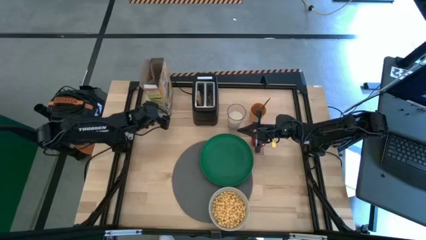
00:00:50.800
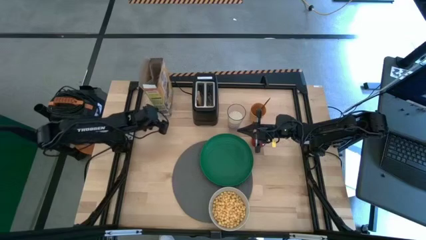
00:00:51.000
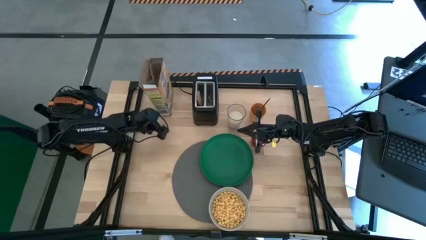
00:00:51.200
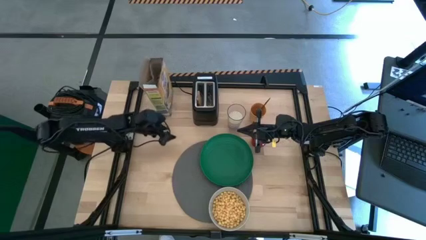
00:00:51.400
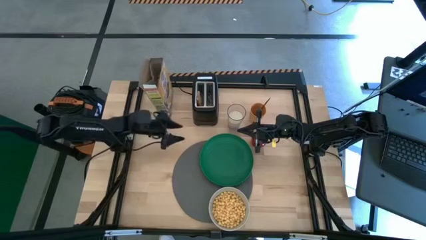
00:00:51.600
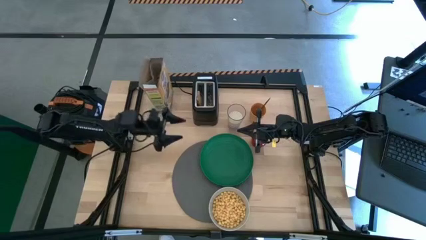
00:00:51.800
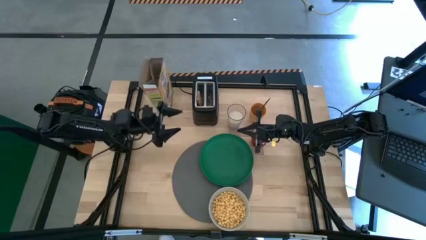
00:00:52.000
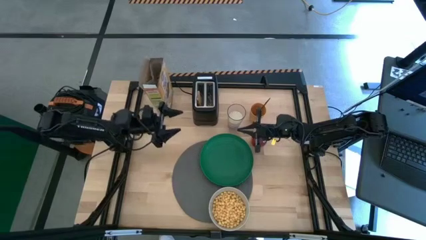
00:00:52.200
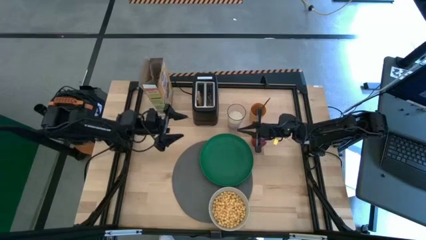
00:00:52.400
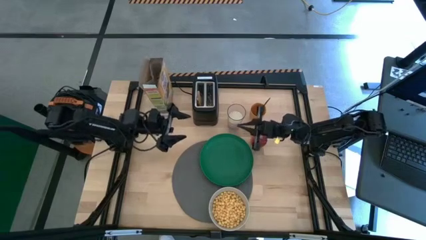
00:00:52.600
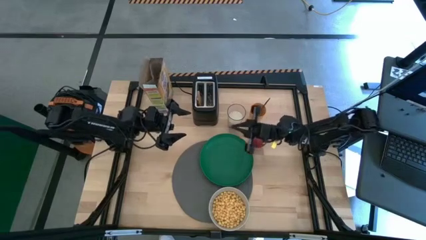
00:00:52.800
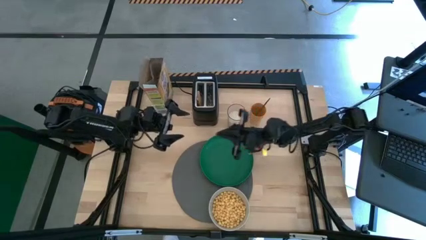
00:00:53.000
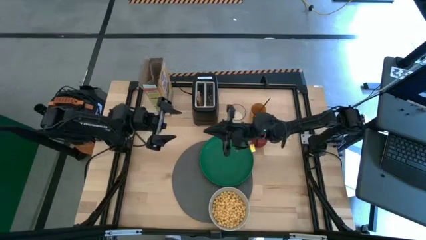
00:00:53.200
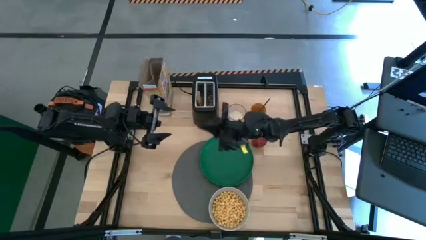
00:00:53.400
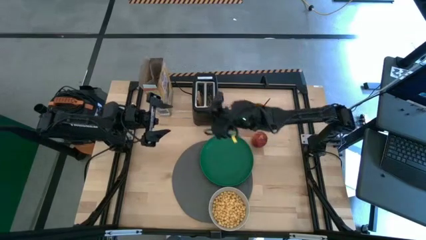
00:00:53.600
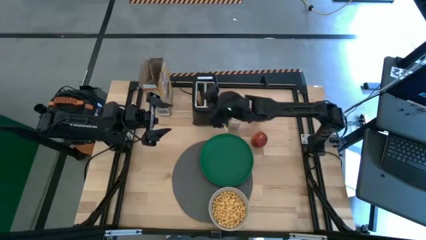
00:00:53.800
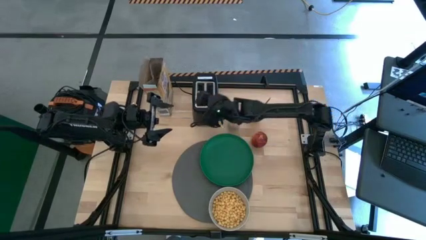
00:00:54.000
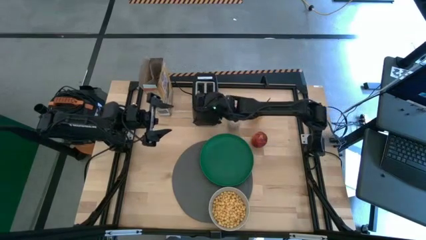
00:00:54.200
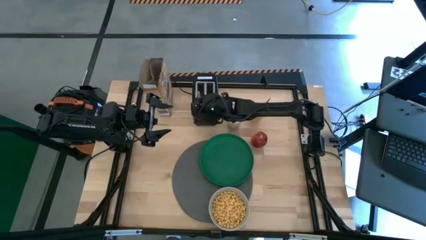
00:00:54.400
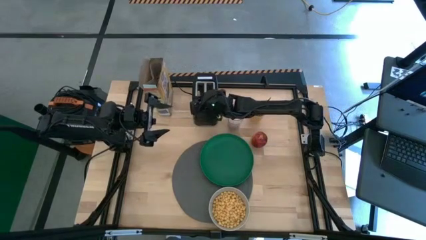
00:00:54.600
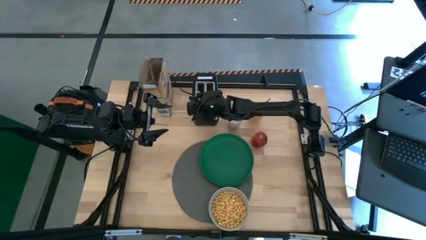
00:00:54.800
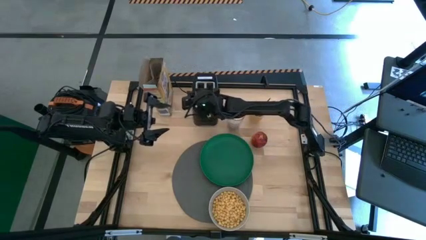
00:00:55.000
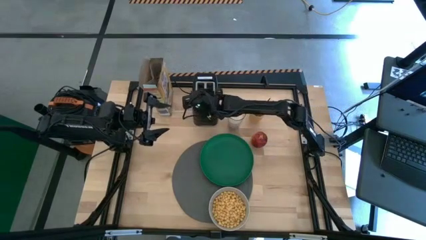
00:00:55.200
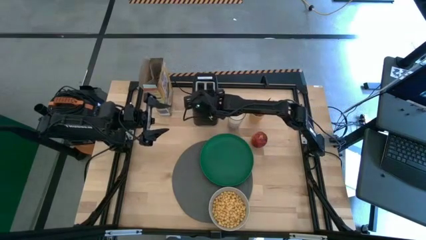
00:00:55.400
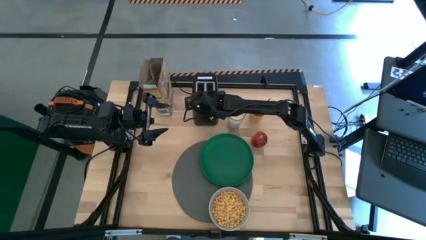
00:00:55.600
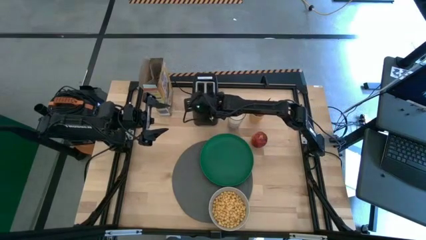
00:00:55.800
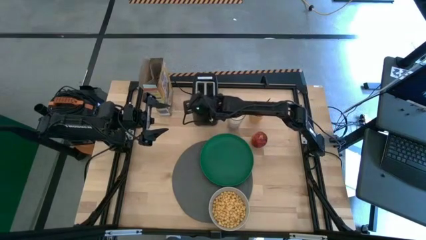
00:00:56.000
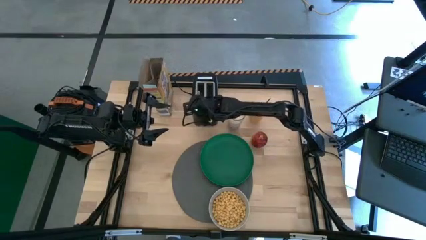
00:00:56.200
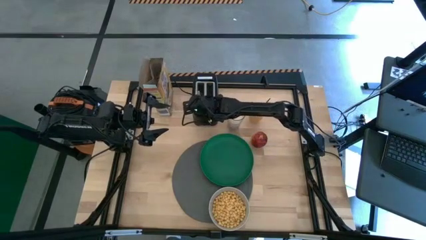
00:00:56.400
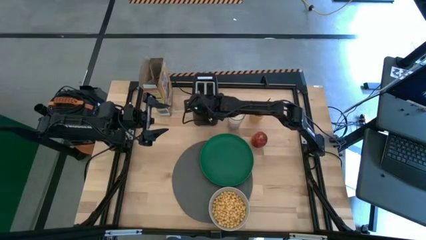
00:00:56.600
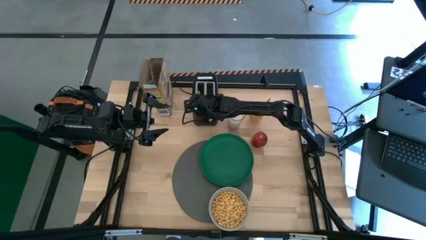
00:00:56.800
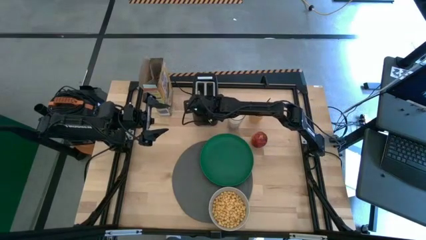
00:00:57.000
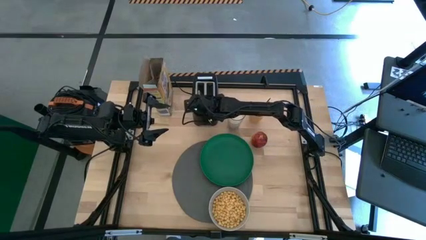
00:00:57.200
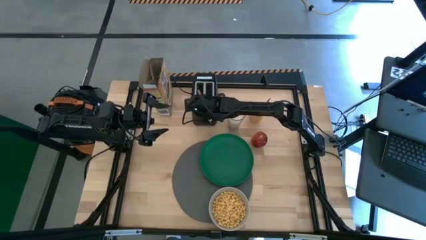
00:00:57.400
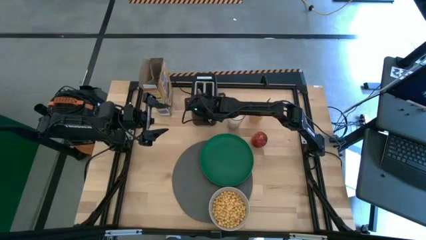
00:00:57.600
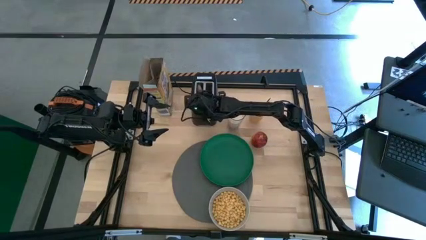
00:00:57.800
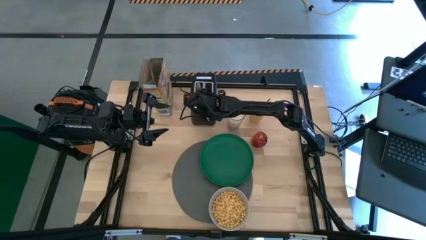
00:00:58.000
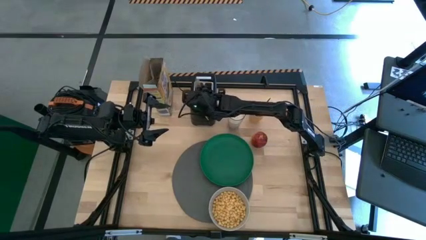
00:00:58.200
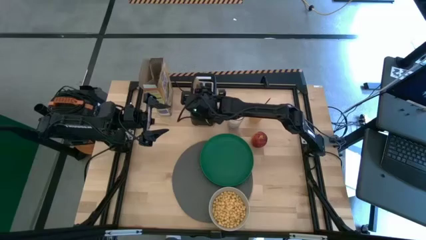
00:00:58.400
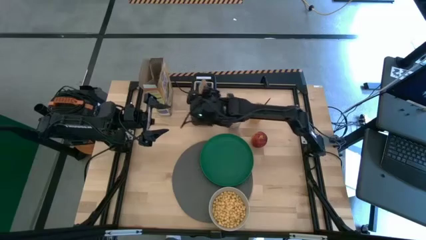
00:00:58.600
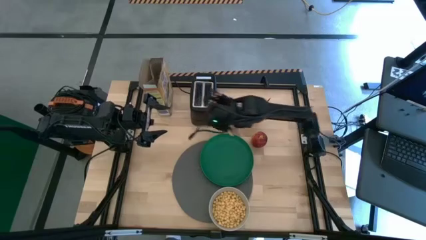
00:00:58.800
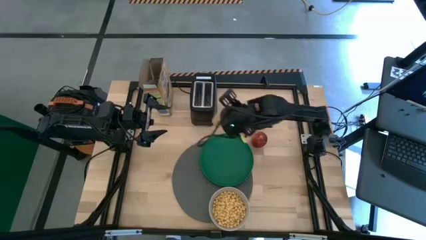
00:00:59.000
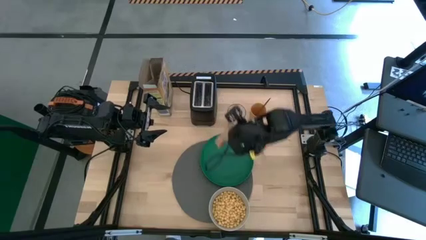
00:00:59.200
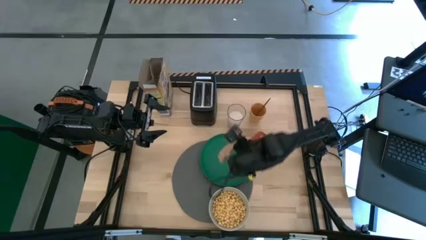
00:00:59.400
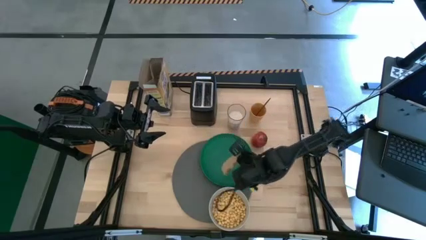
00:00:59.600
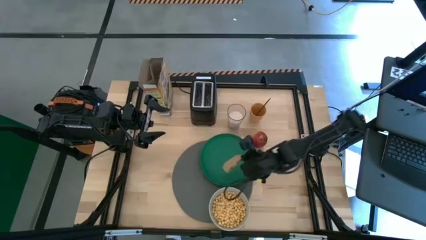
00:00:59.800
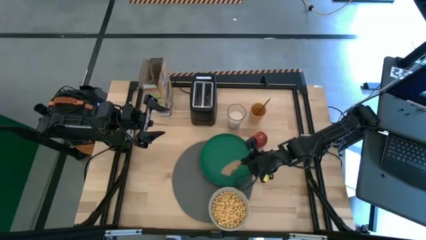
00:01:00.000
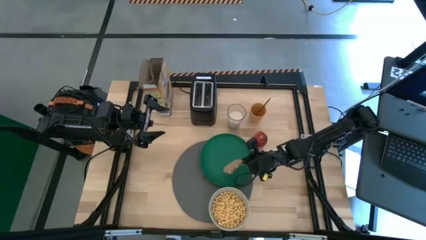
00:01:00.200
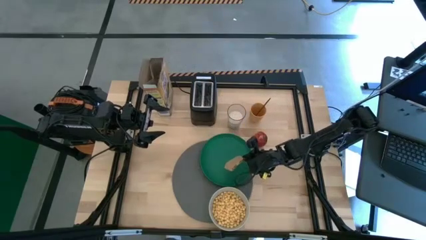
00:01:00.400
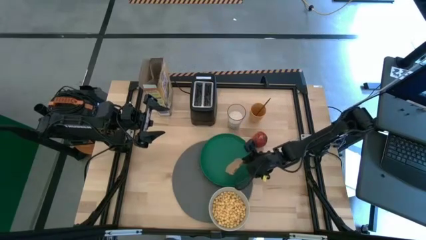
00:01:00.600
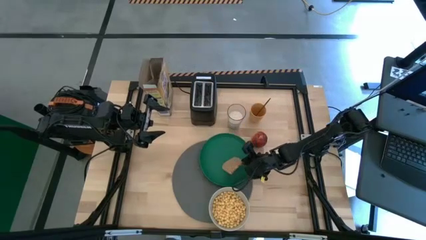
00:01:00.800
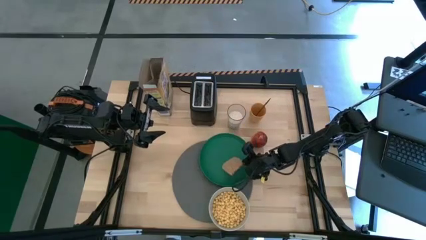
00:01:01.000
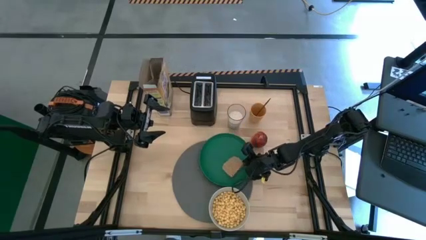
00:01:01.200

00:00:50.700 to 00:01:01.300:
Task: Arrange a breakfast setting
Put the toasted bread on the green plate

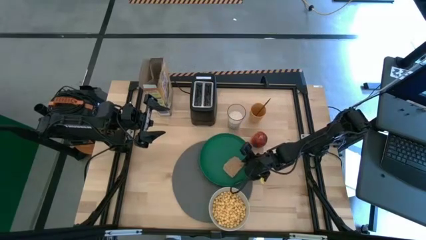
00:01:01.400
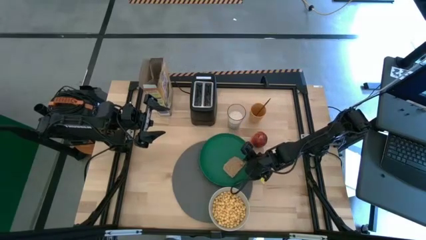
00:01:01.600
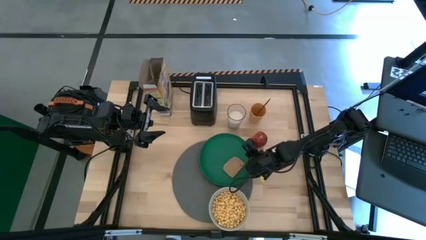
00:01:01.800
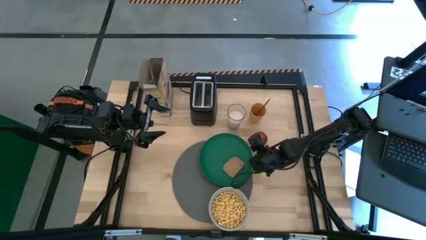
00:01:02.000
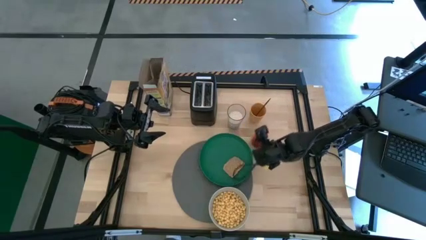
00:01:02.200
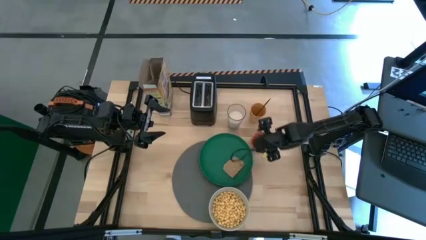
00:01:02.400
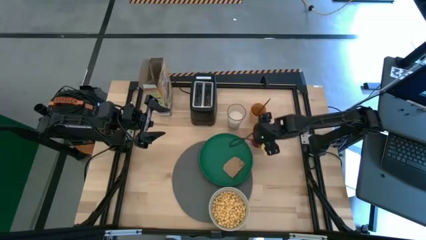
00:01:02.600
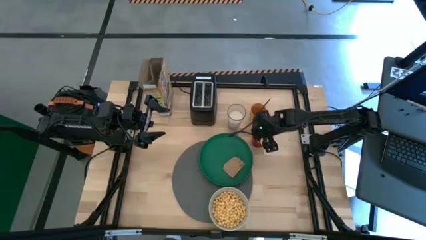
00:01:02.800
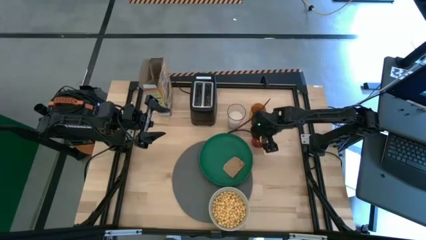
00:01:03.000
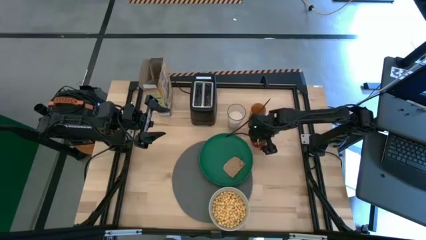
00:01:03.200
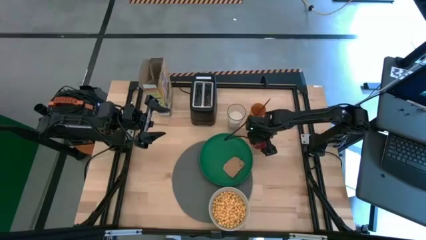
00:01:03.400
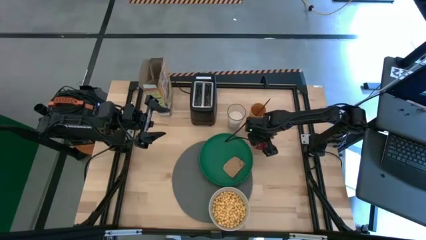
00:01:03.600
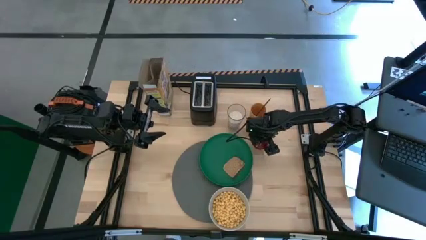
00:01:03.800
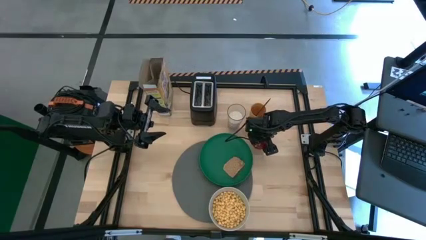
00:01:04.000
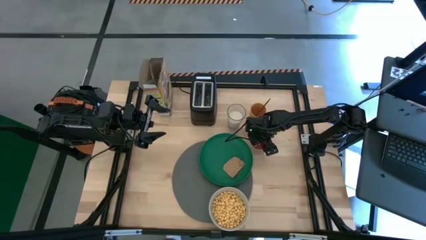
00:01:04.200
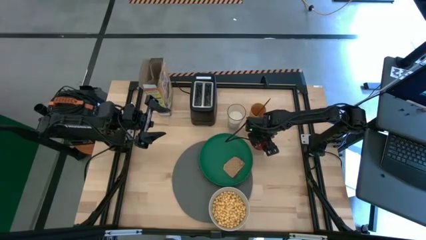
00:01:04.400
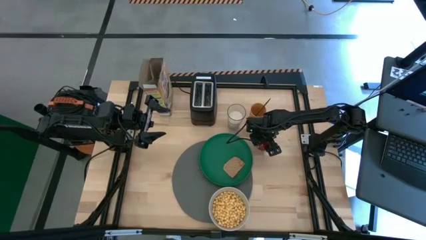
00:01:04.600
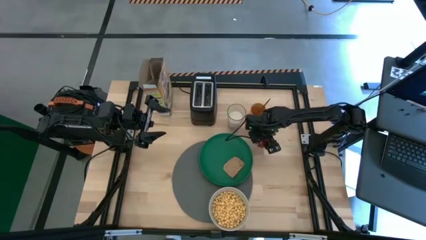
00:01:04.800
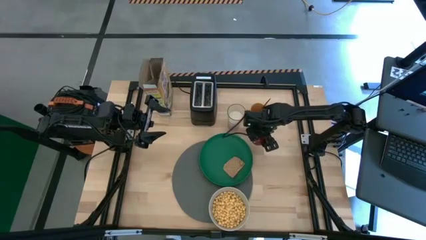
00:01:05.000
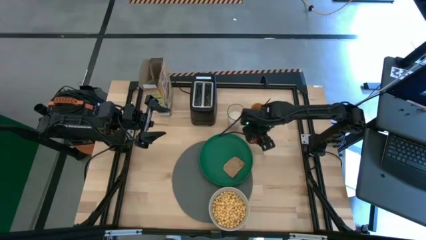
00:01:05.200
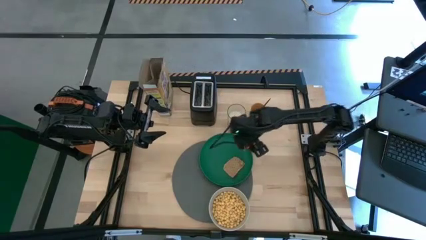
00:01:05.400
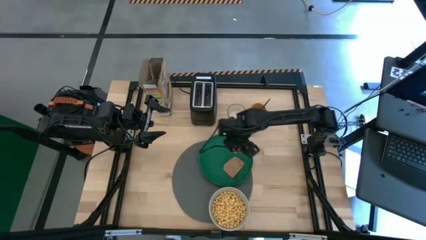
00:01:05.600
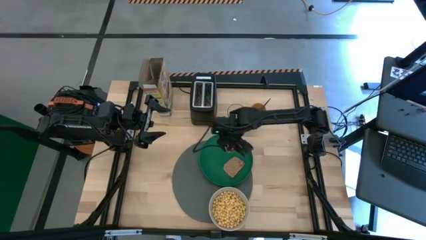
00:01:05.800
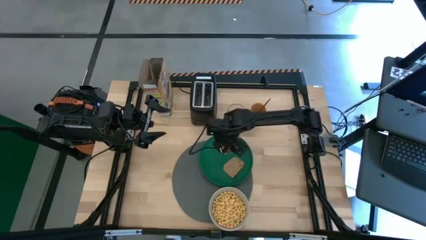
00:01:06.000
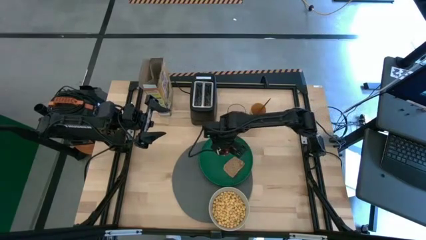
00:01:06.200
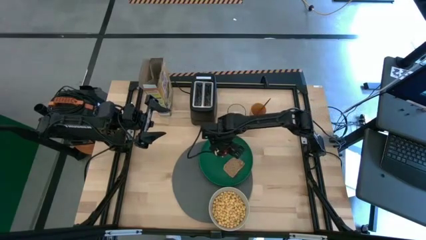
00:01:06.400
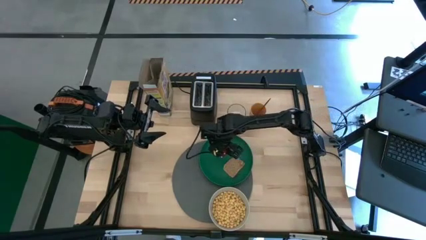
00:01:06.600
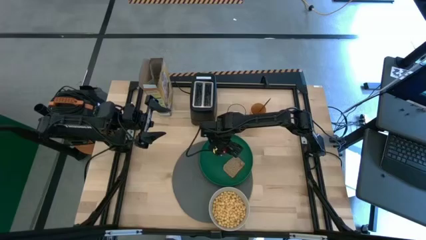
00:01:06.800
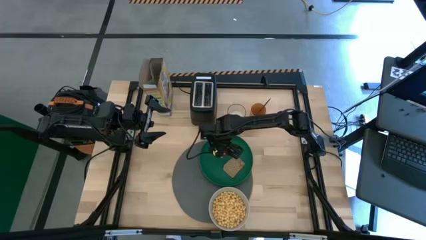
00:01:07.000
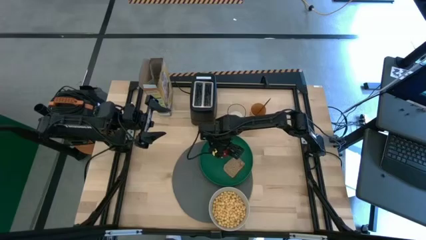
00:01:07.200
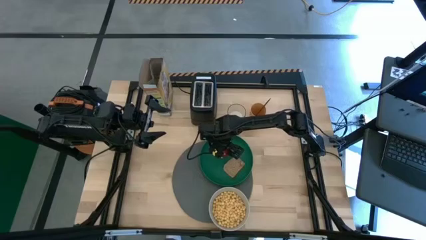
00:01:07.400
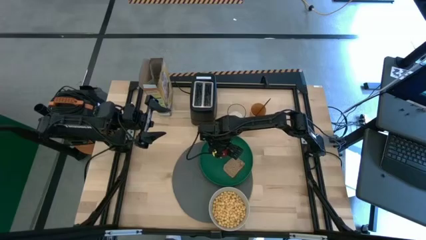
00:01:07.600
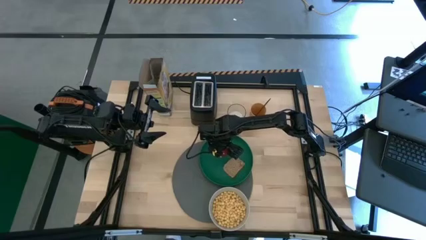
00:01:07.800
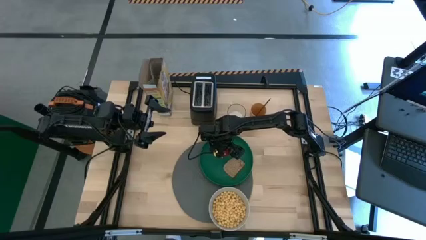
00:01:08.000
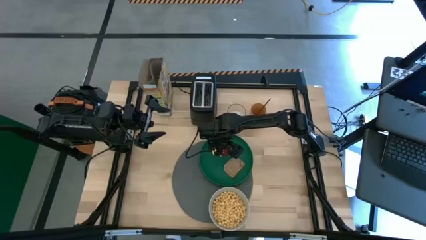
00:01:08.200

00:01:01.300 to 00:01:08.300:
Put the apple on the green plate
